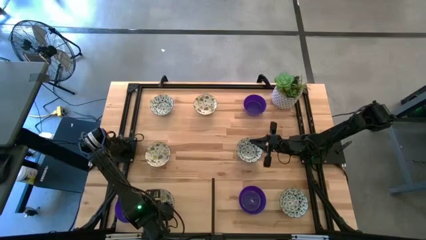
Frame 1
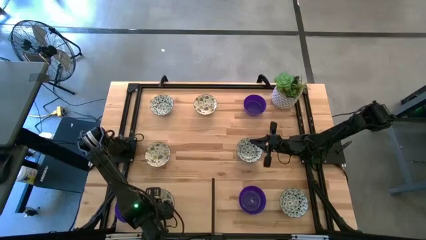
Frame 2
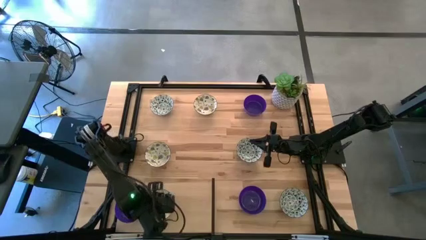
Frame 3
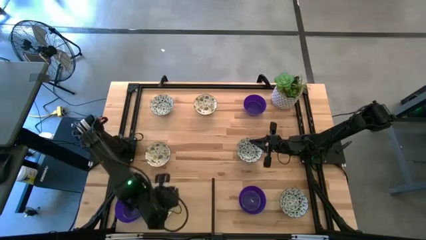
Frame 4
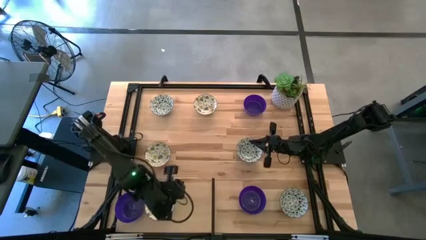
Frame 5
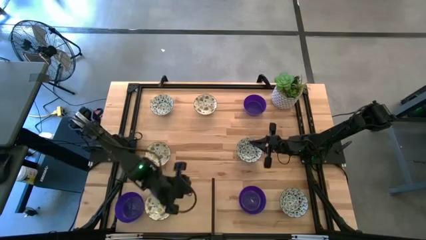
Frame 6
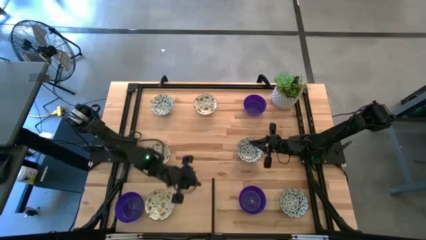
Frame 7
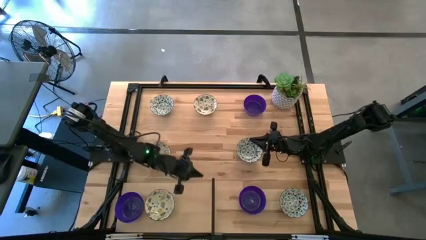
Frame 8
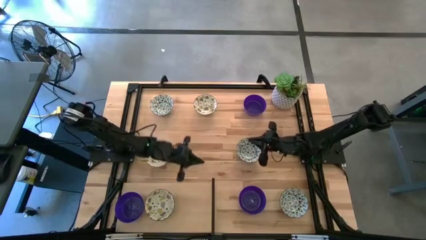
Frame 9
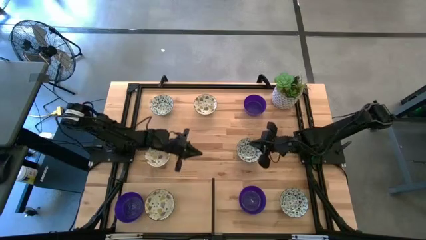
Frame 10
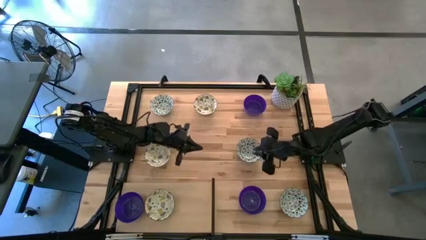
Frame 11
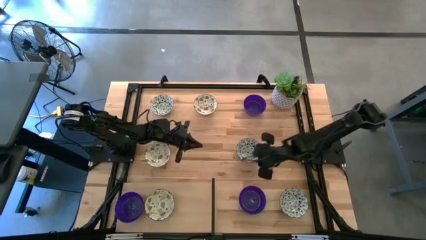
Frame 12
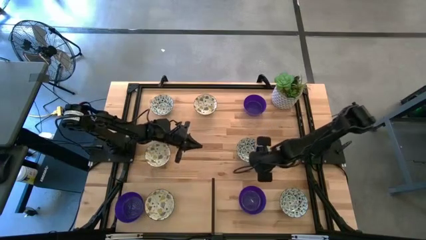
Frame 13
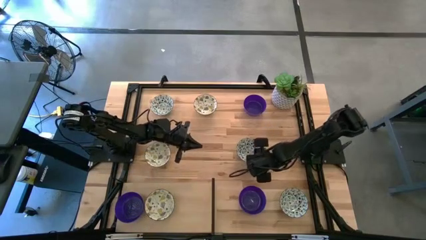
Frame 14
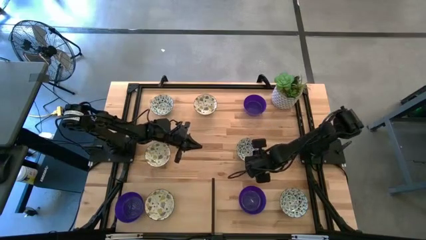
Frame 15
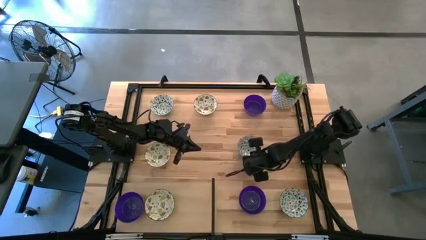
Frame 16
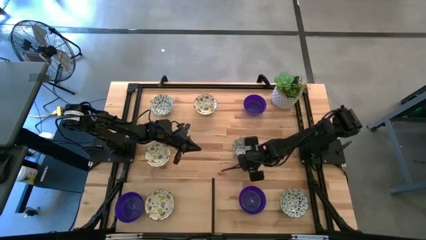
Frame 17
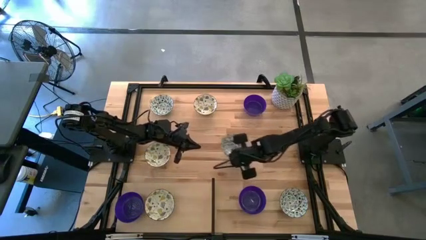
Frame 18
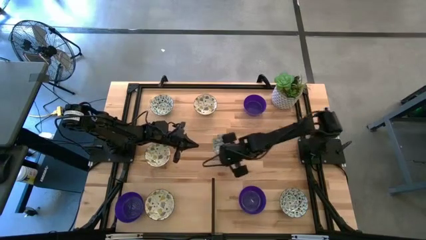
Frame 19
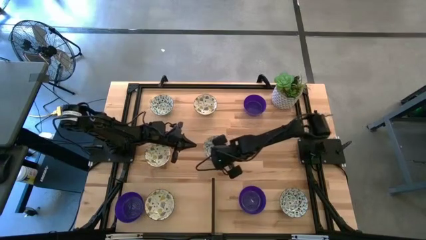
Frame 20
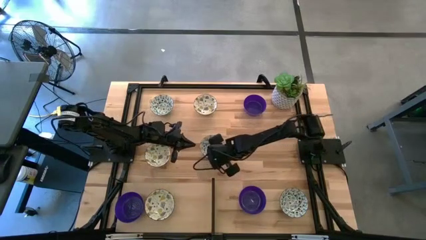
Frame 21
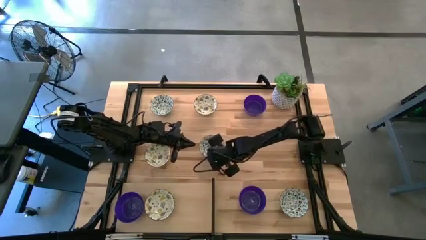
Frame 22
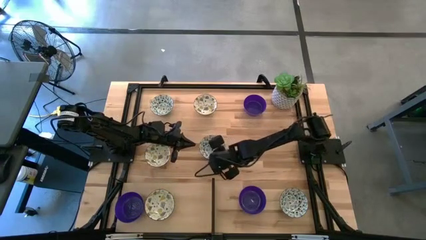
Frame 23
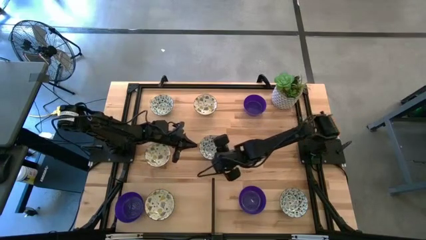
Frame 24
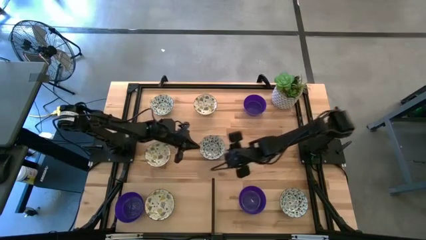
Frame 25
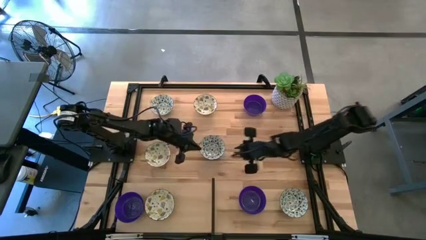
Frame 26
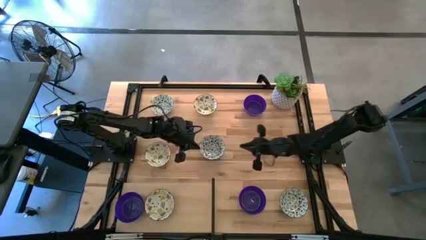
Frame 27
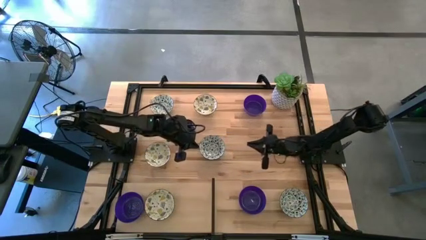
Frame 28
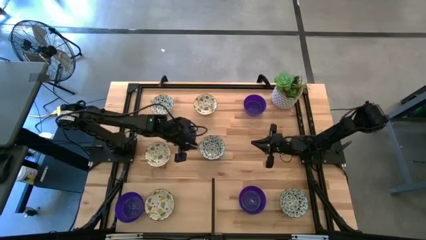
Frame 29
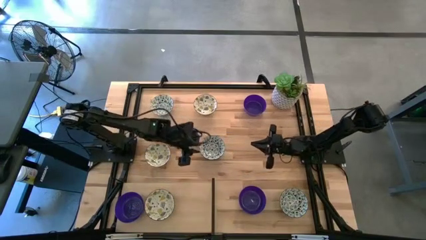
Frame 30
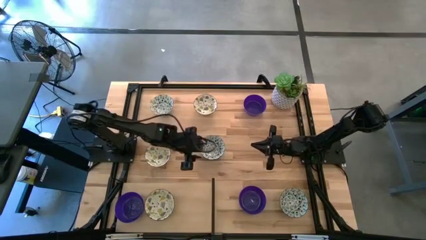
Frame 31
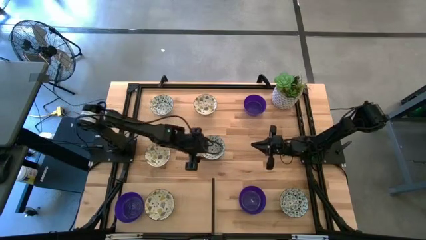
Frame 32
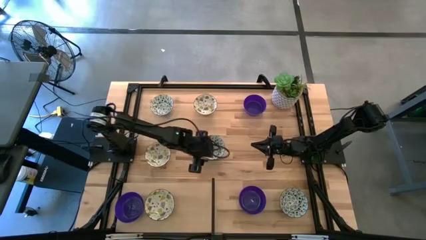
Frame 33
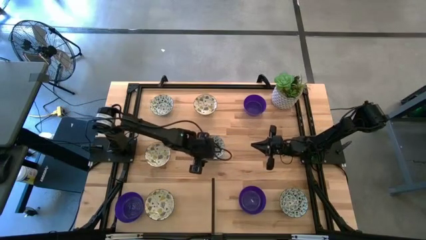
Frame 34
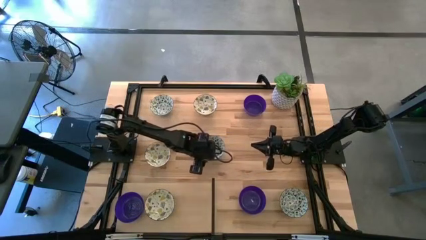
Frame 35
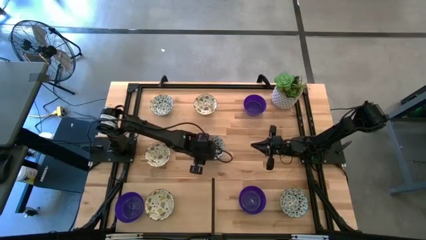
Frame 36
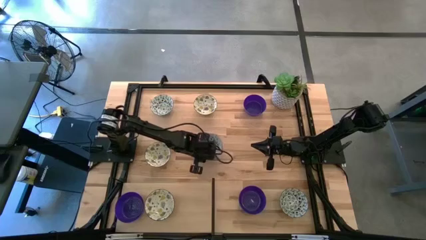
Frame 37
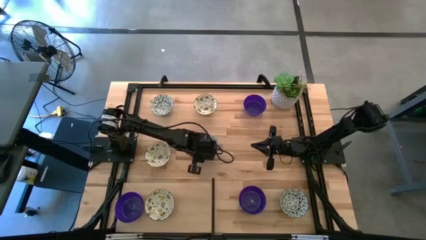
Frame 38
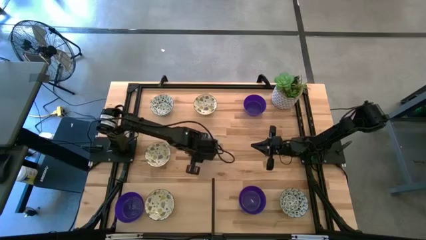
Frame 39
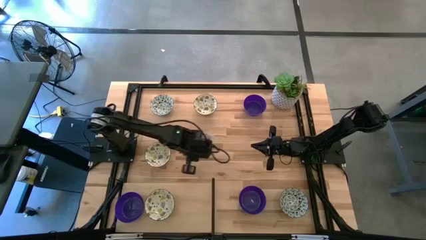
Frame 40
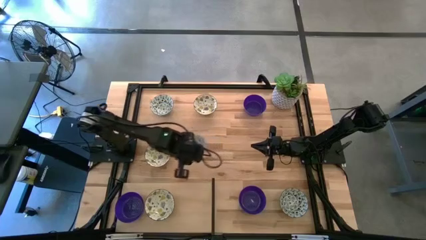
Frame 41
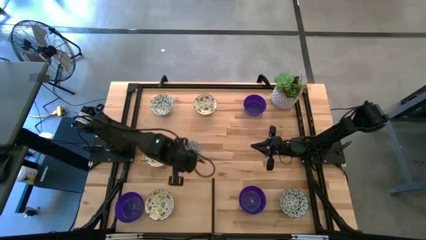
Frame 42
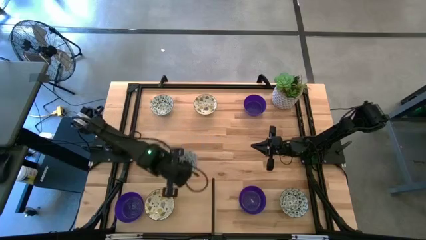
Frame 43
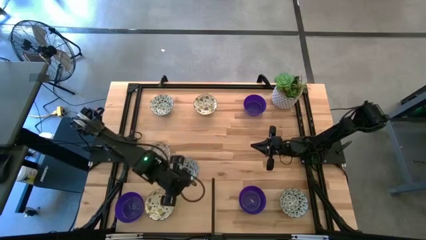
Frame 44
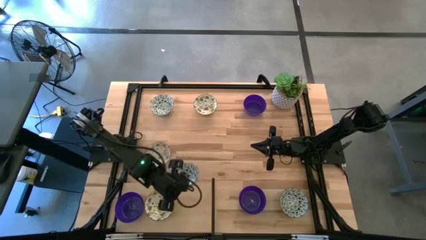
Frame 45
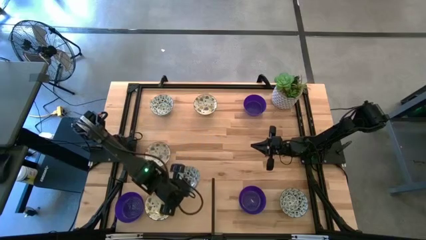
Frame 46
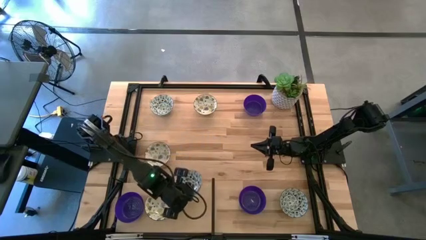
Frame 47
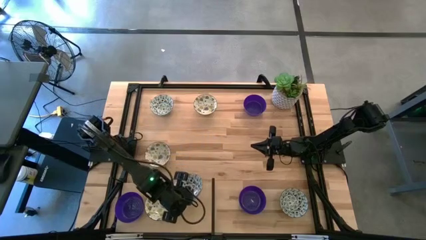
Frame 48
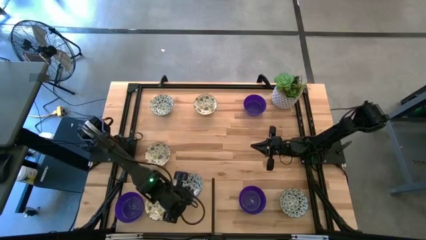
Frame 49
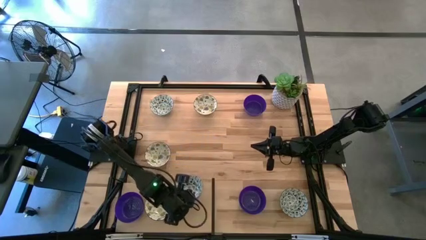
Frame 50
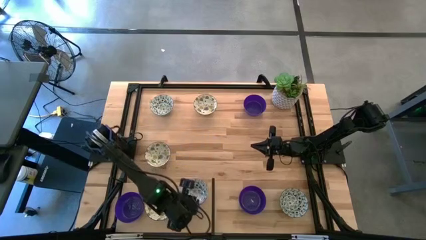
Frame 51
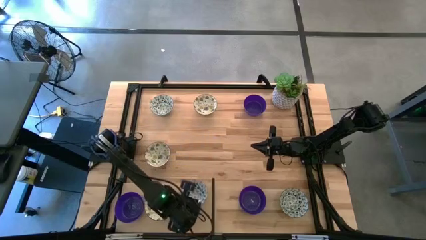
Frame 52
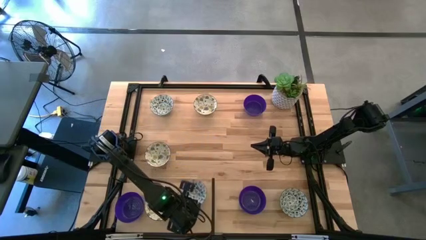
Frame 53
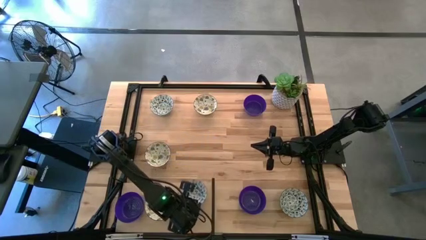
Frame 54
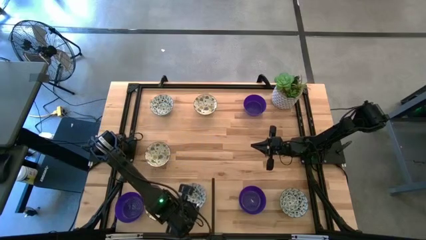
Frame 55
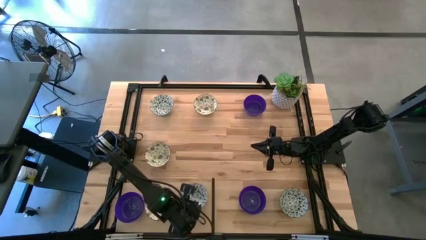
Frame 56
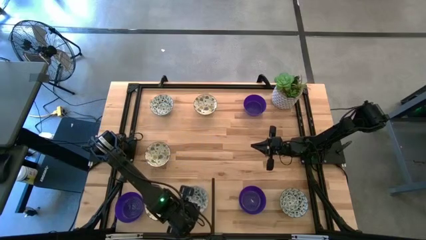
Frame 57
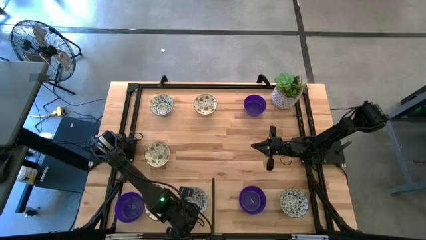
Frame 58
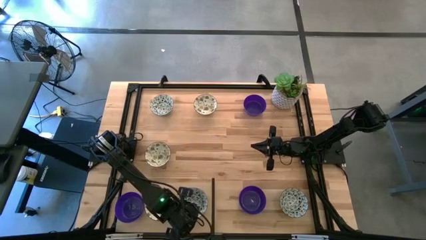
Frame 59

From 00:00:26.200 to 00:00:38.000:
Task: Pick & Place Mini bowls
Put the middle blue patterned bowl on the shelf

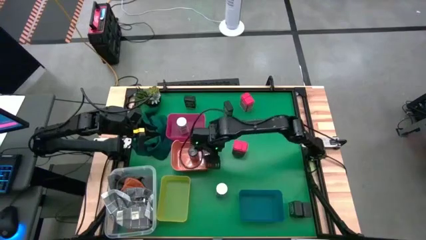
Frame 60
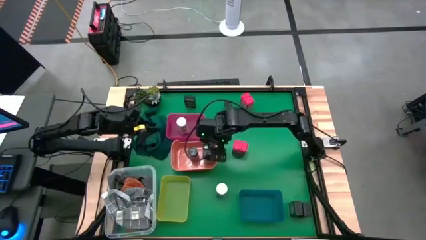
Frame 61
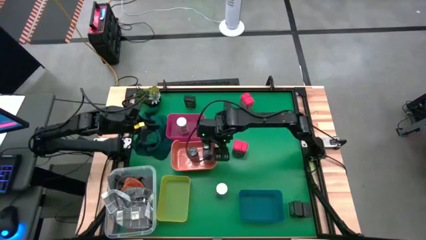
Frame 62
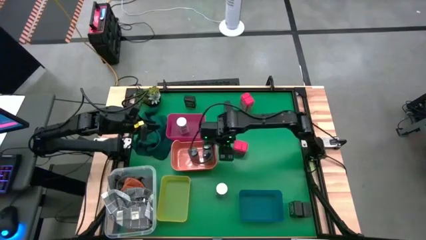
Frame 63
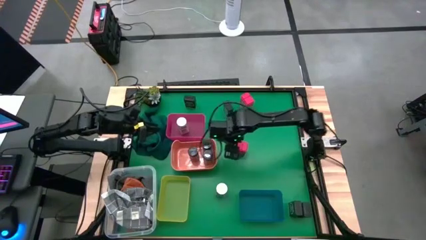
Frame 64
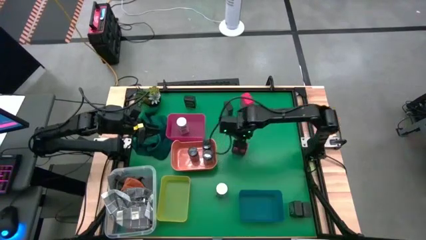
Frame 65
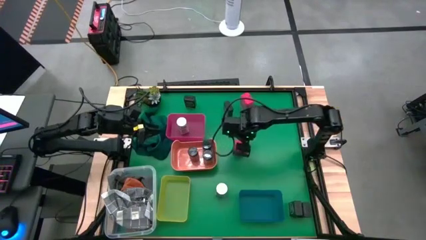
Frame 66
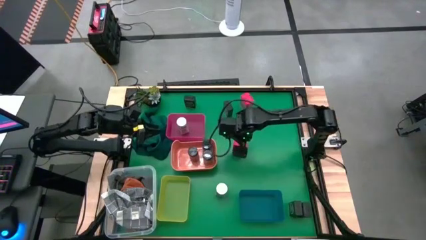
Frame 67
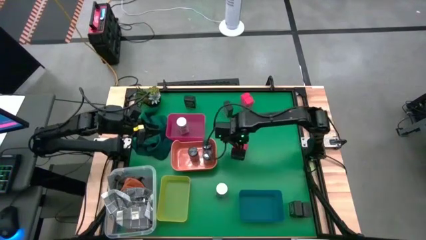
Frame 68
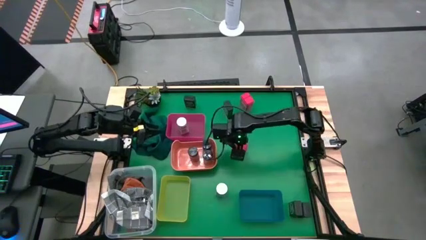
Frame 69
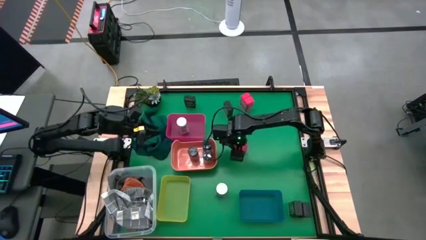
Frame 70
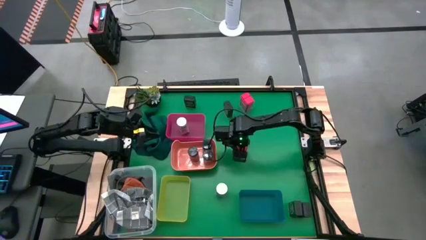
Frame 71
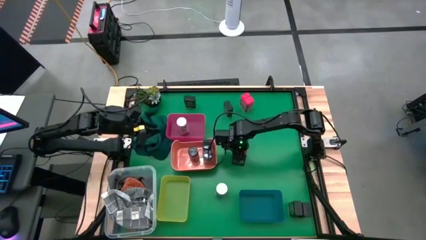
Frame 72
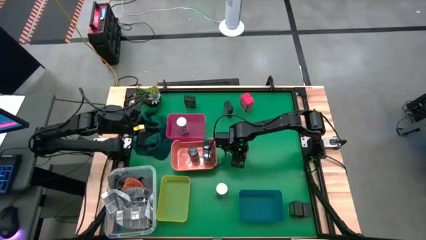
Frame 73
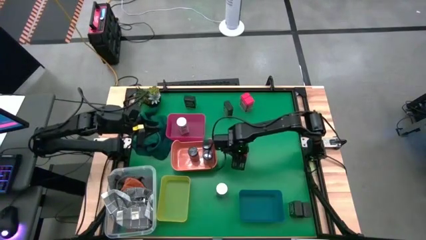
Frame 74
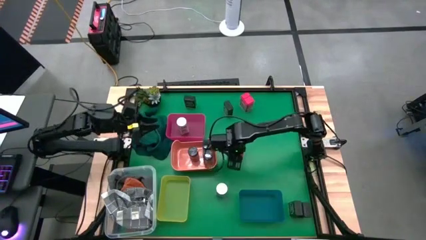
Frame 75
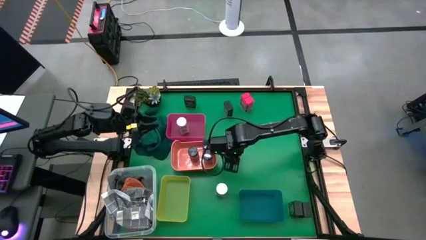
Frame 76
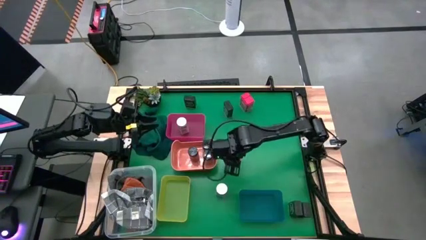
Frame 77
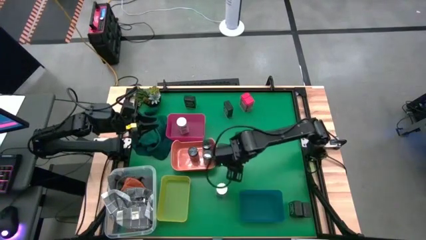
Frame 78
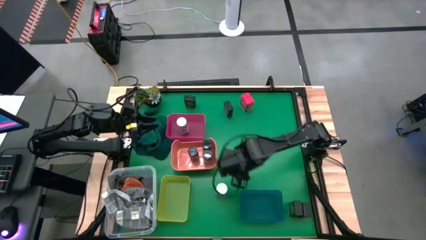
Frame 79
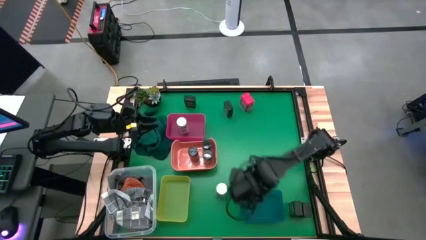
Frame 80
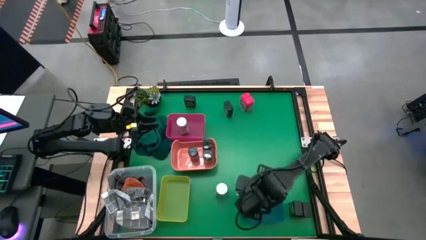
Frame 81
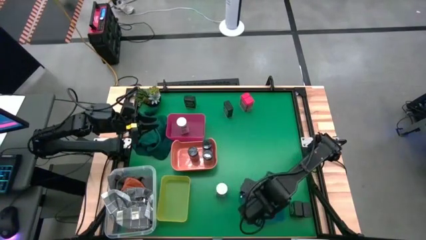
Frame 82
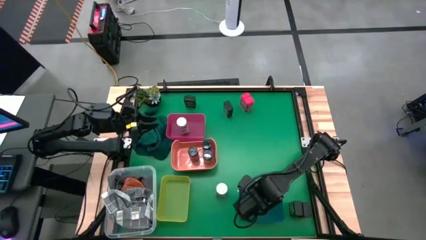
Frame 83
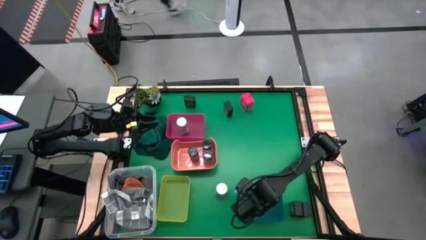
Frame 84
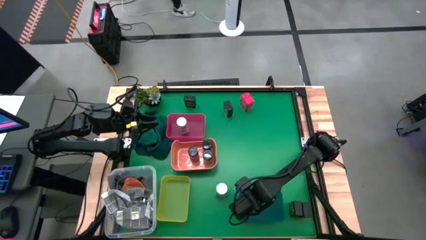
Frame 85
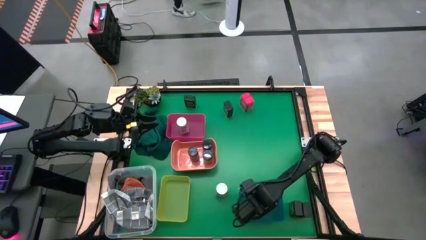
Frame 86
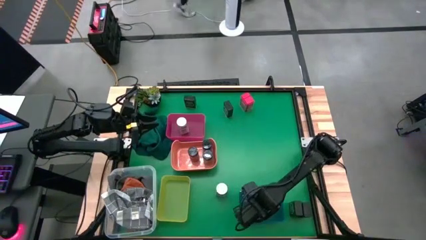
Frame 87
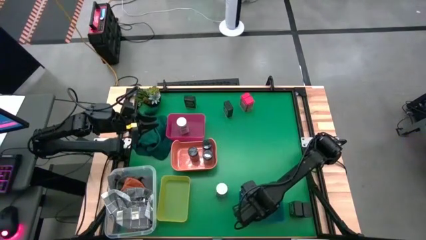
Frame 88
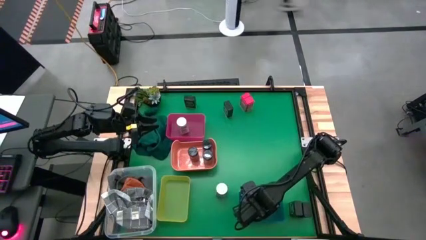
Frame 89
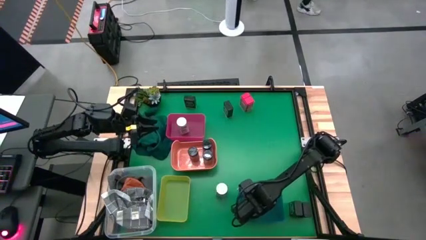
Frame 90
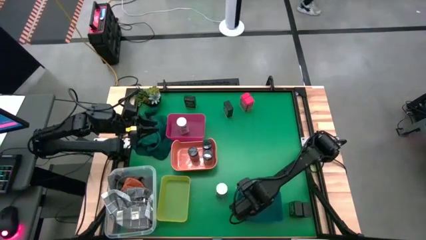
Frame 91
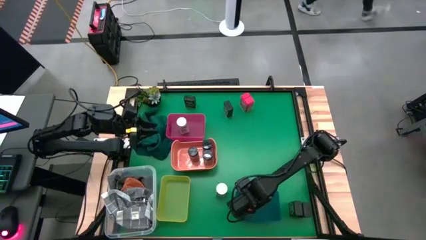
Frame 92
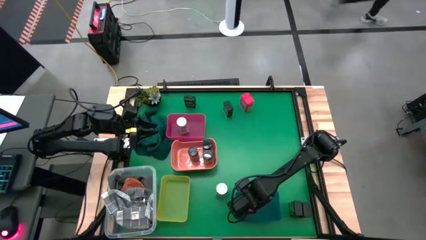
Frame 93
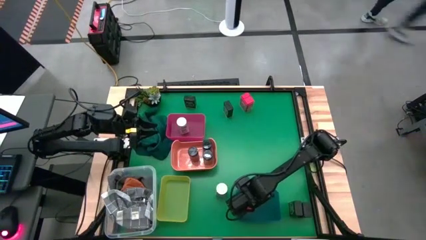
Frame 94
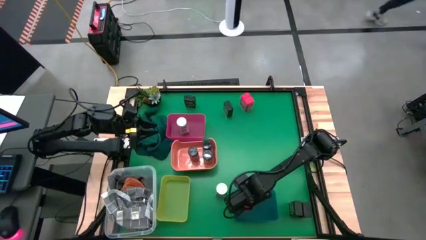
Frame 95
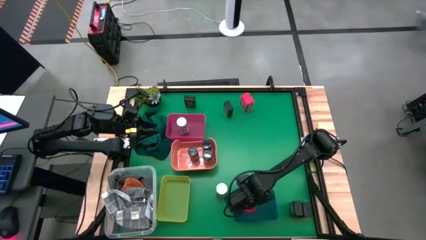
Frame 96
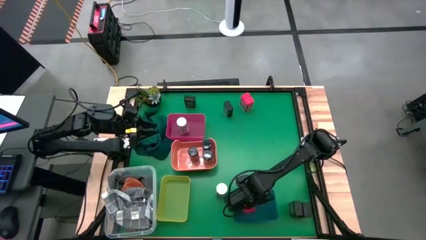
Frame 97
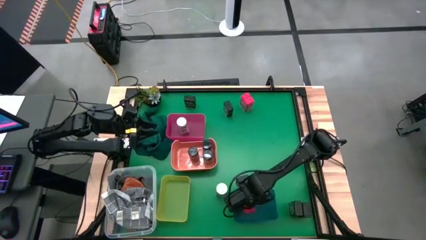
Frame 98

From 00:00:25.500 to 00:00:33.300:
Task: Sort spices by type
Put the bottom red seasoning can into the blue bin
